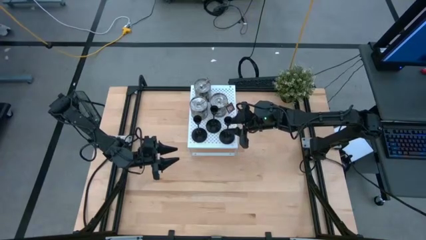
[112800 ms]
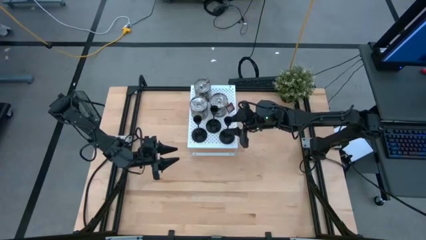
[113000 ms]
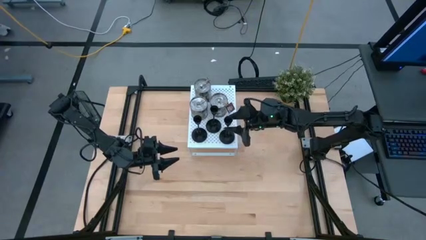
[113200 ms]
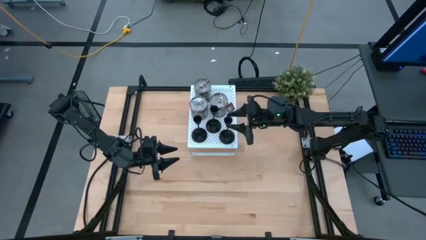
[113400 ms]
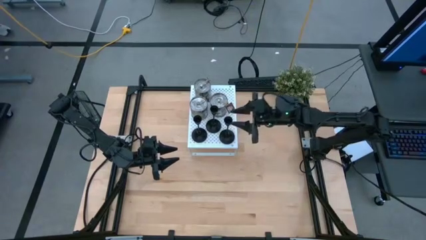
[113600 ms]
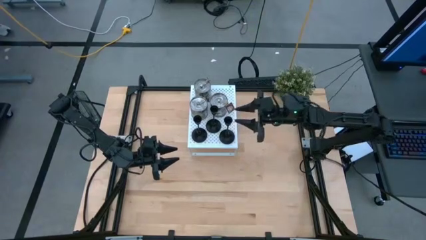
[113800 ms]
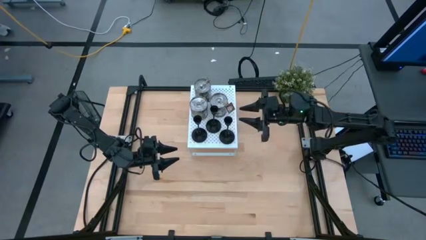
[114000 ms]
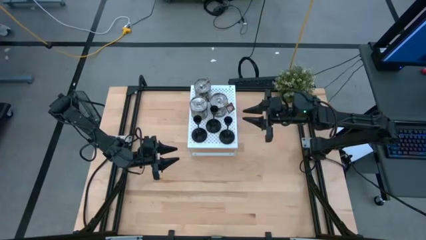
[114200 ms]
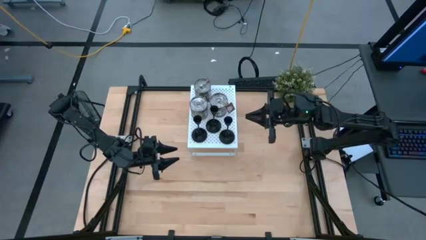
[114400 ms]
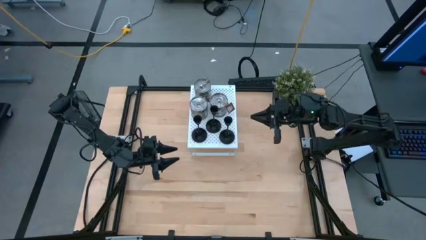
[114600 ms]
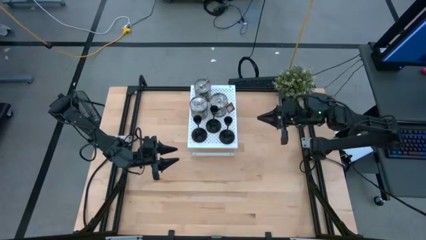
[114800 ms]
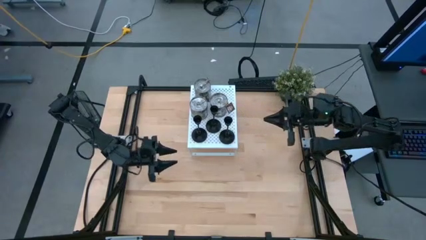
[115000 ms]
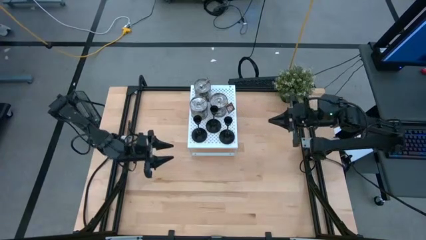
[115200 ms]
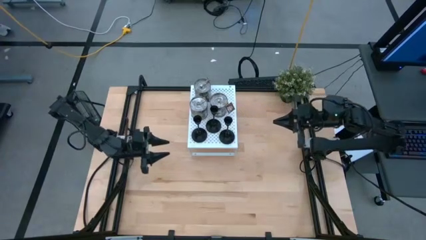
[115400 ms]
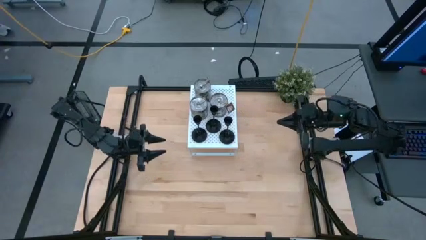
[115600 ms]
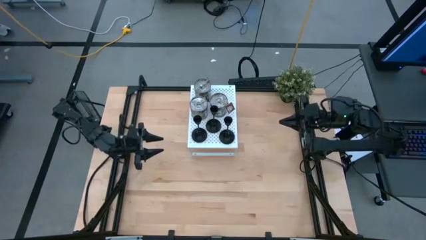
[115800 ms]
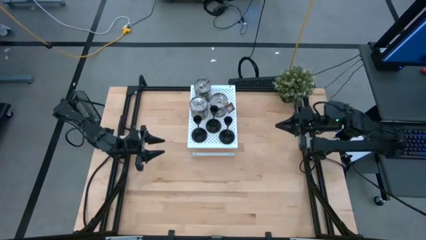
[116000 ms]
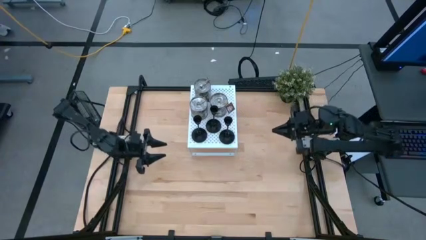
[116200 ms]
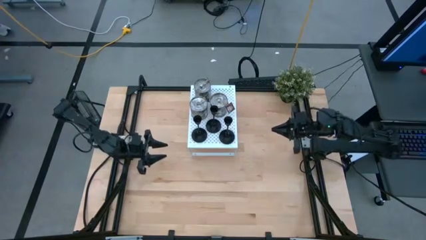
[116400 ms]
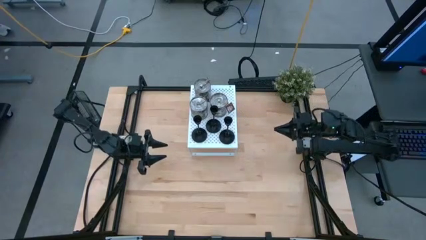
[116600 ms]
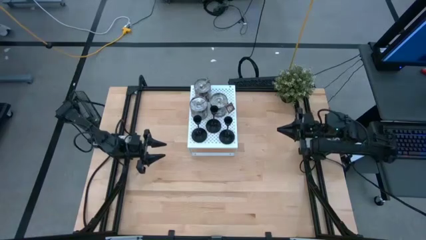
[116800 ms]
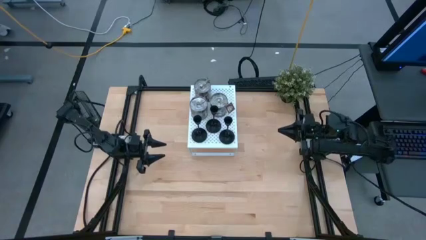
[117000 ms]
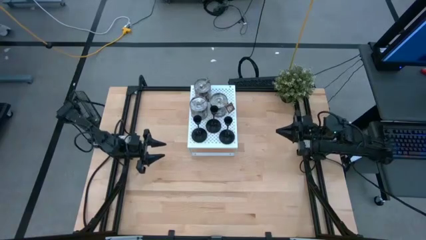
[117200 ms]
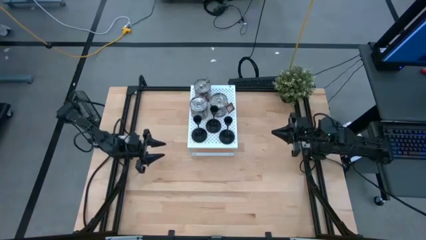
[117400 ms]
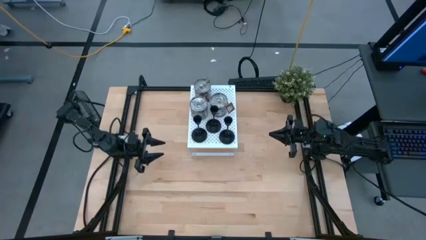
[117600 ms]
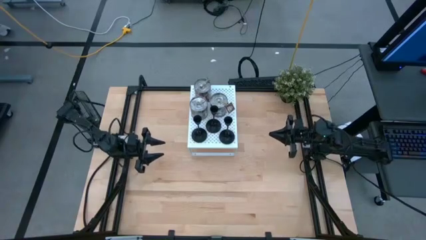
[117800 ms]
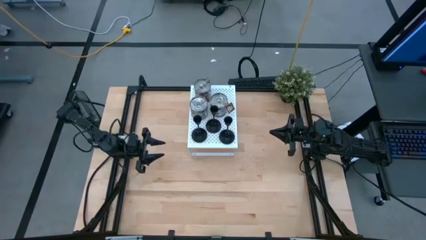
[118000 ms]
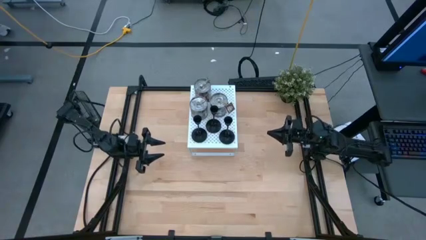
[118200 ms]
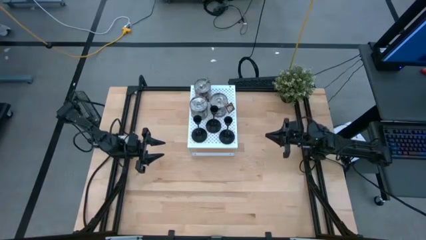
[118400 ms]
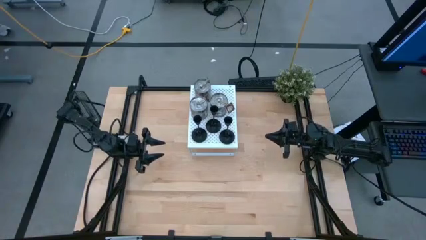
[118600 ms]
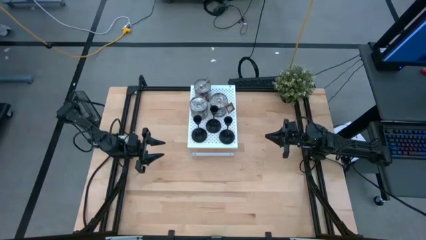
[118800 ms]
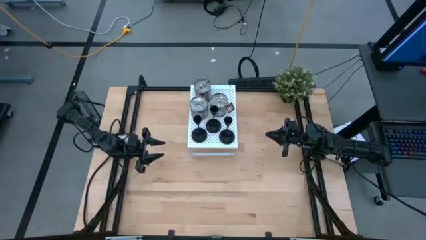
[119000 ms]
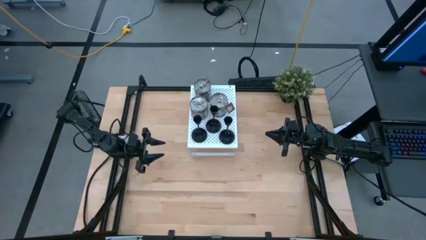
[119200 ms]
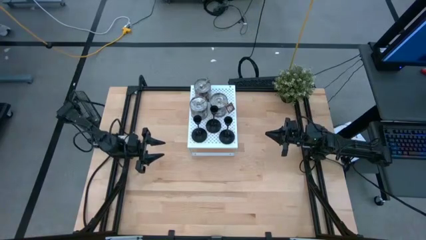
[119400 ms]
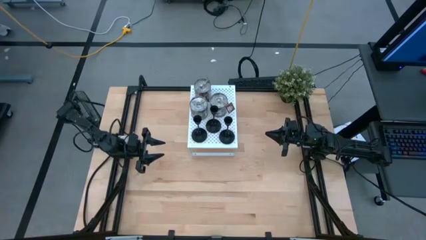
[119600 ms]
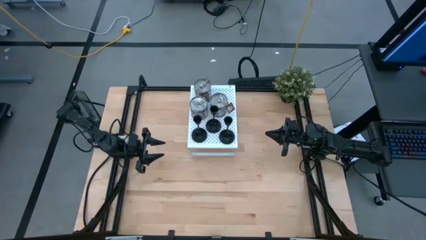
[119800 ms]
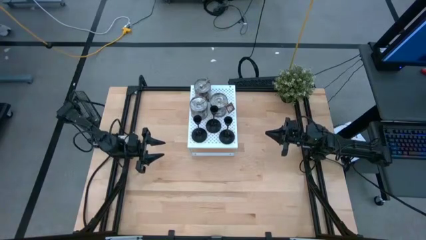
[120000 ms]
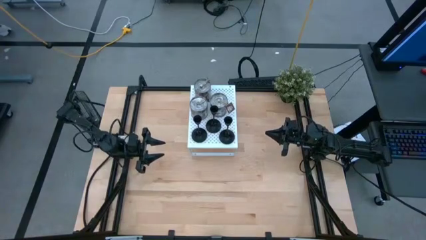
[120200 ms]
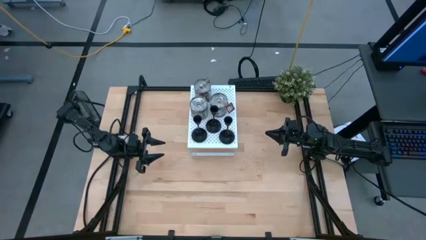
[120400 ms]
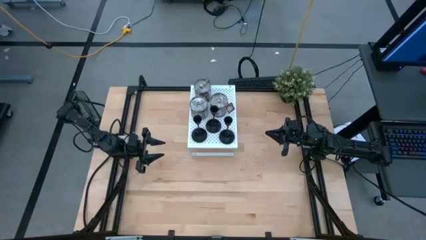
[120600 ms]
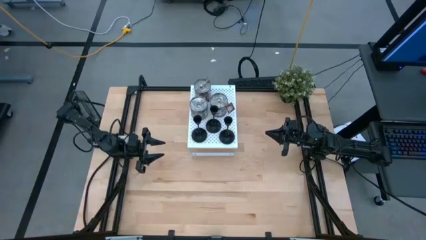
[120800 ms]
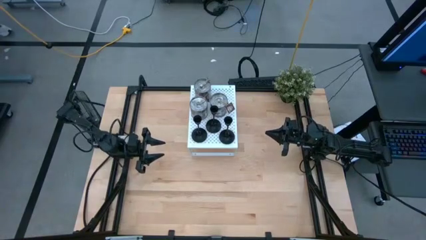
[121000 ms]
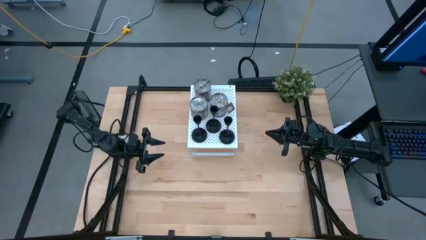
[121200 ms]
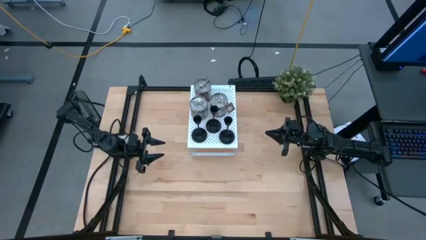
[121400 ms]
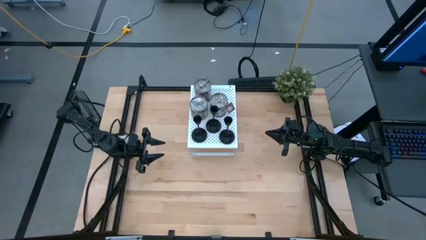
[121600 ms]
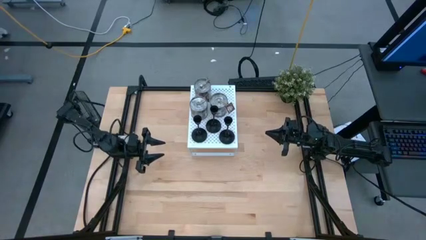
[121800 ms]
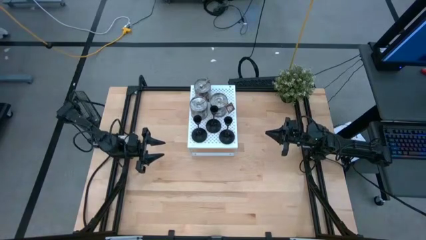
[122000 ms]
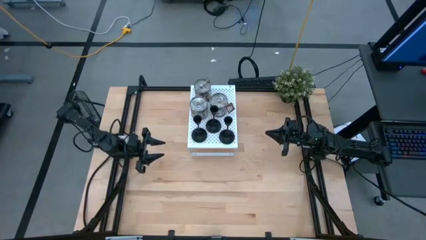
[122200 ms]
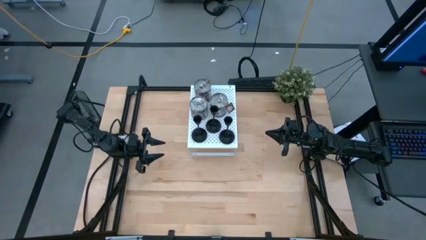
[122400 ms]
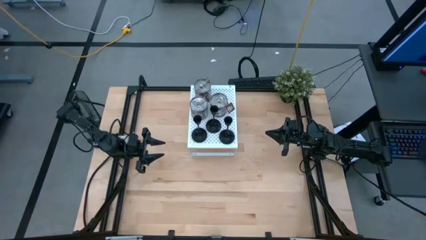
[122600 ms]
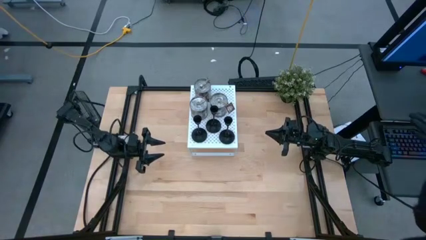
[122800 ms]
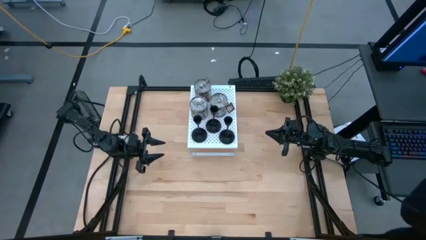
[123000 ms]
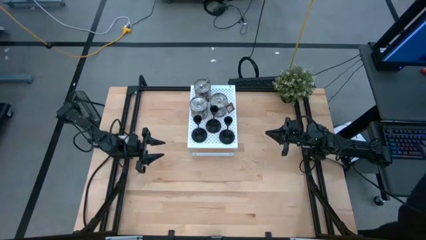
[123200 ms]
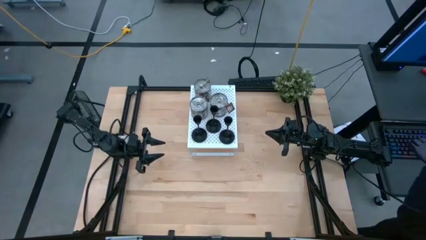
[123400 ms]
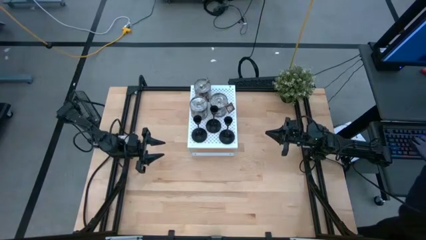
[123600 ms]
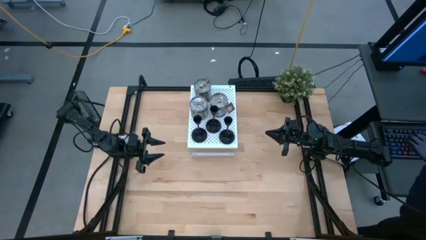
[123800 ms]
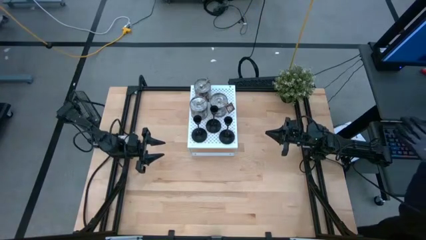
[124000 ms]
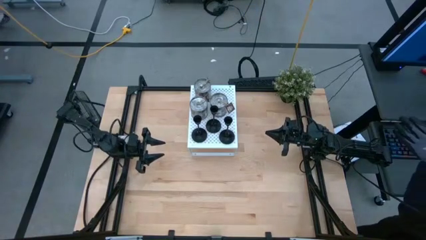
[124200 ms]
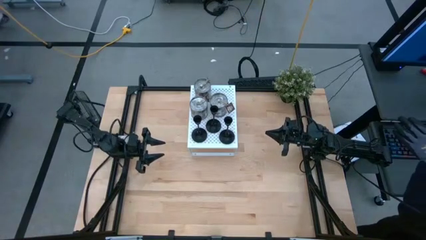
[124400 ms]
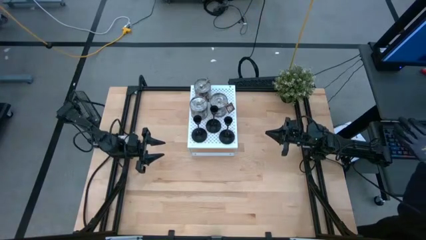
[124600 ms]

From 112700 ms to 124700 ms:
Task: Pick & Place candle stick holders
Return to Home Position
